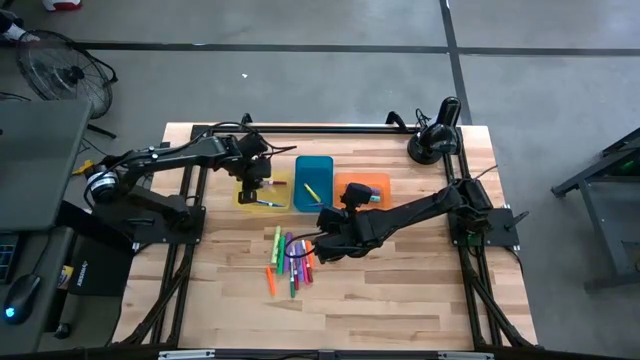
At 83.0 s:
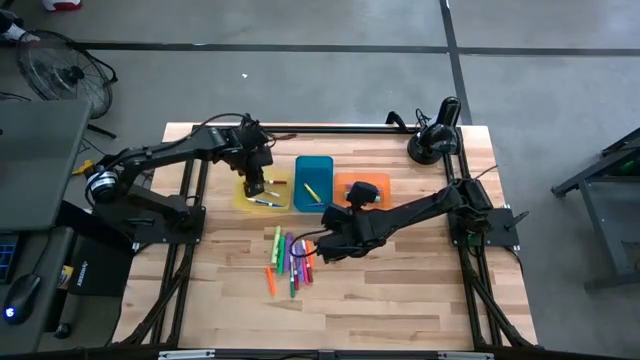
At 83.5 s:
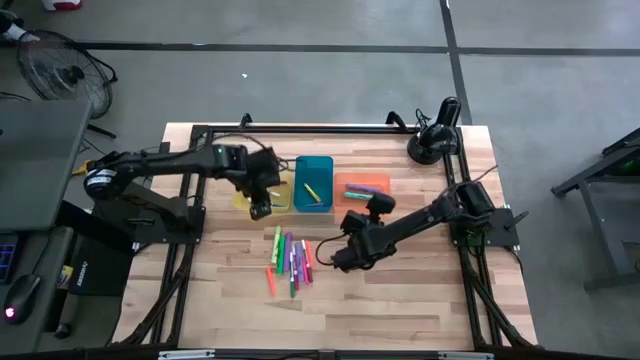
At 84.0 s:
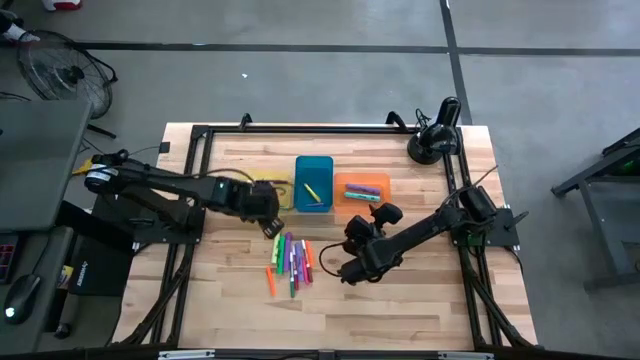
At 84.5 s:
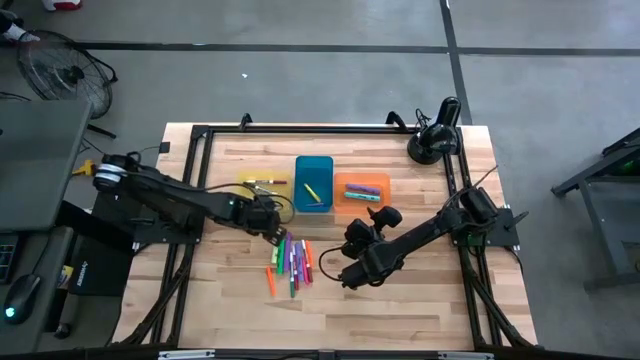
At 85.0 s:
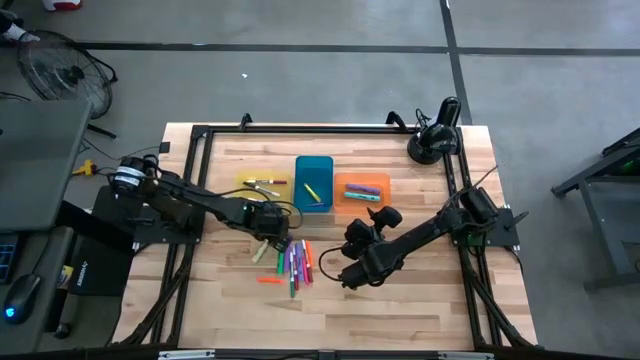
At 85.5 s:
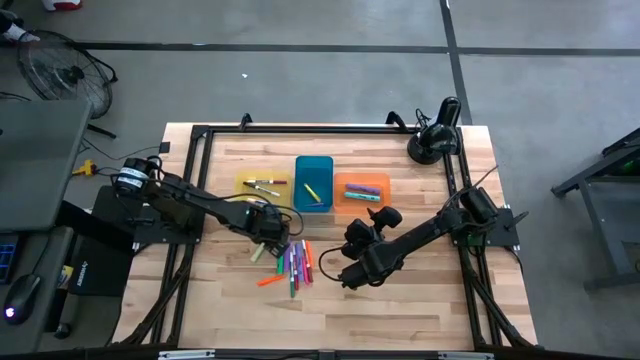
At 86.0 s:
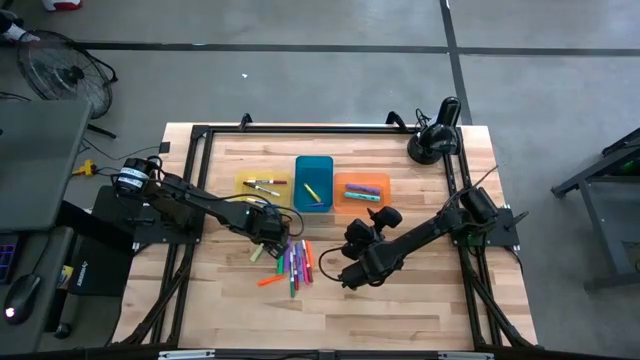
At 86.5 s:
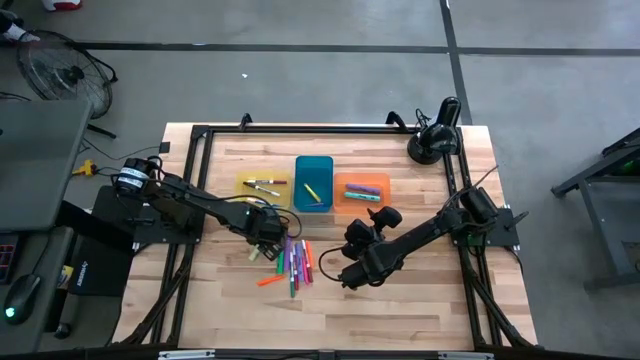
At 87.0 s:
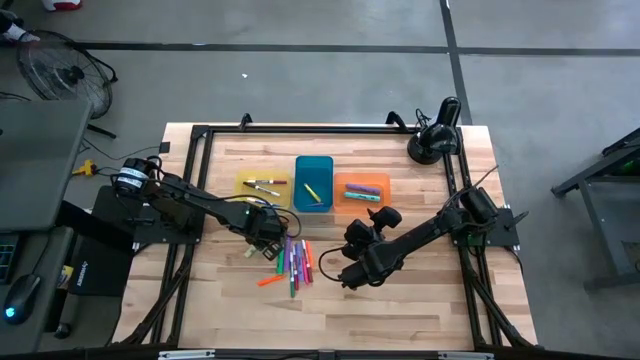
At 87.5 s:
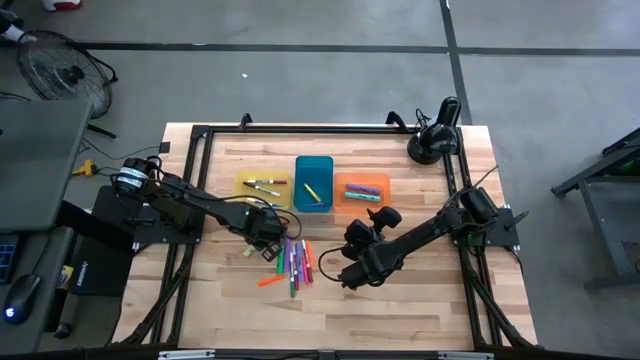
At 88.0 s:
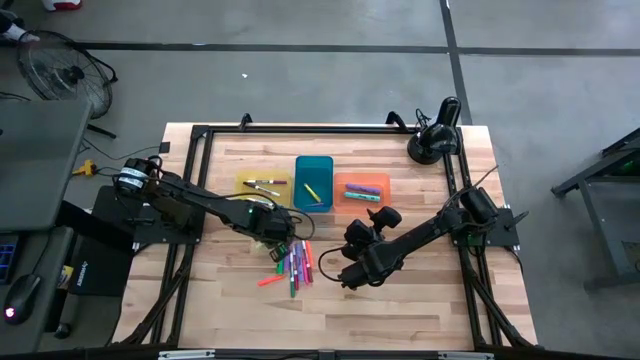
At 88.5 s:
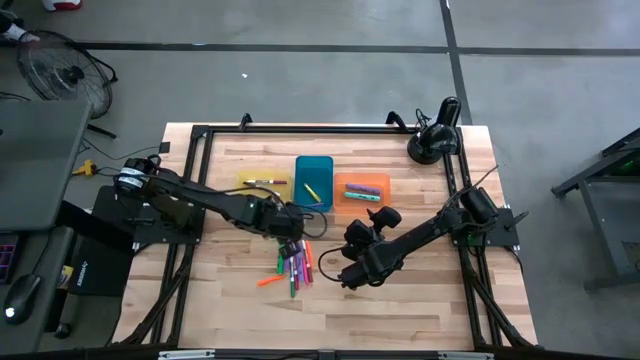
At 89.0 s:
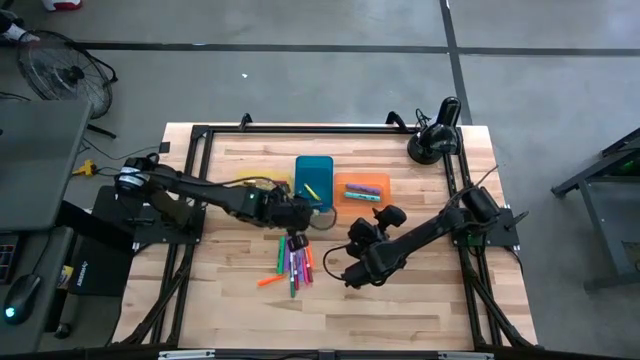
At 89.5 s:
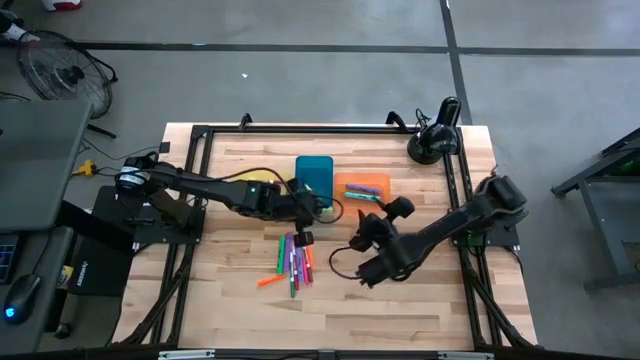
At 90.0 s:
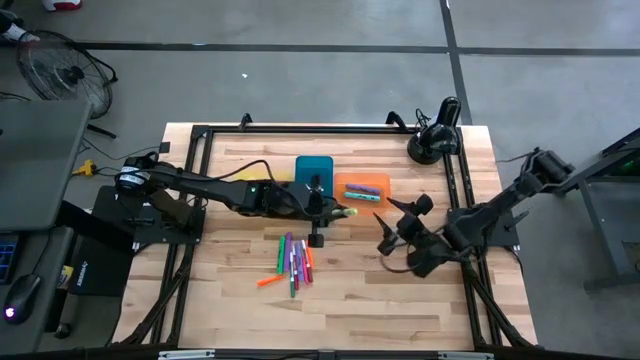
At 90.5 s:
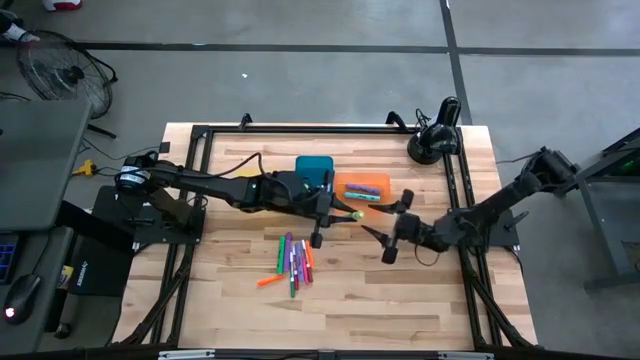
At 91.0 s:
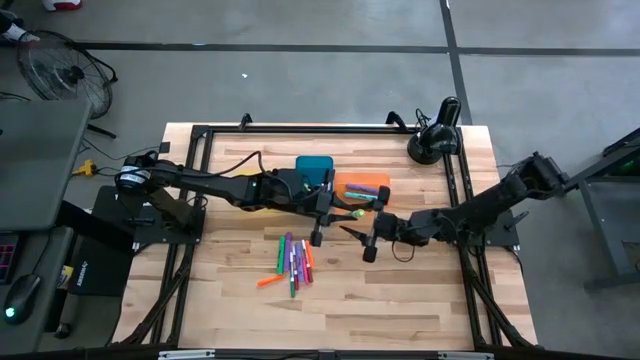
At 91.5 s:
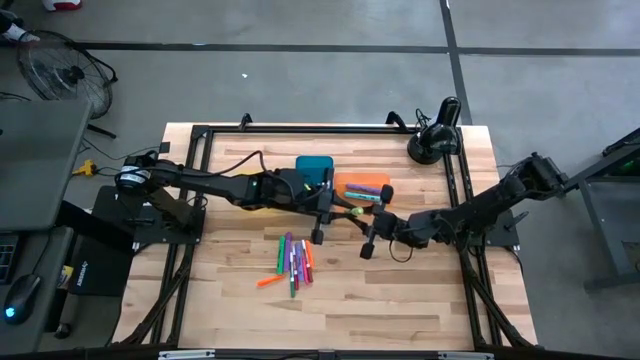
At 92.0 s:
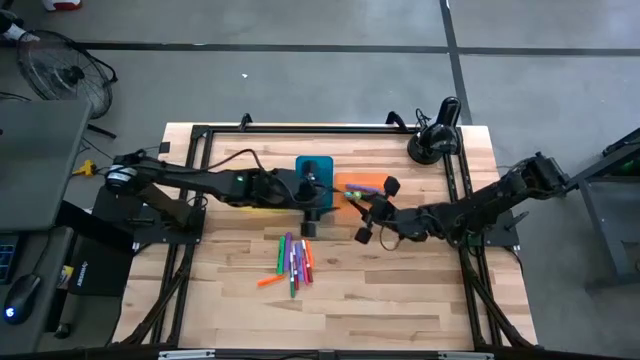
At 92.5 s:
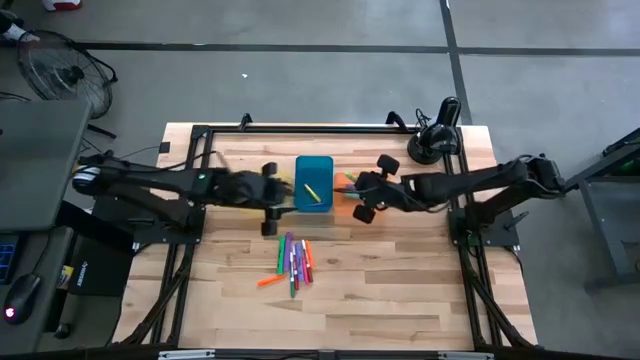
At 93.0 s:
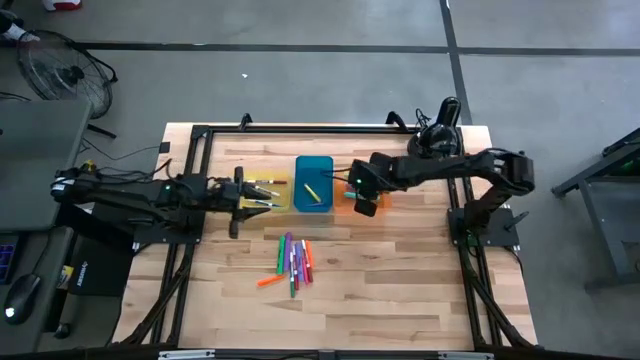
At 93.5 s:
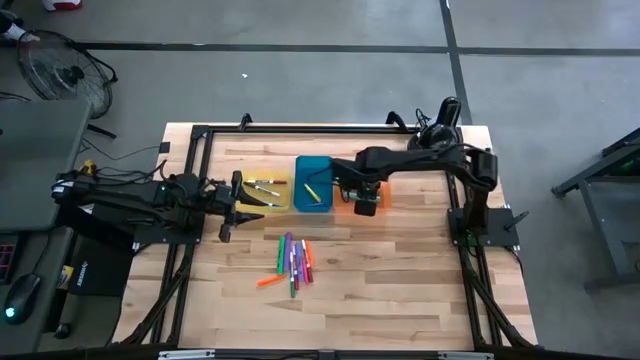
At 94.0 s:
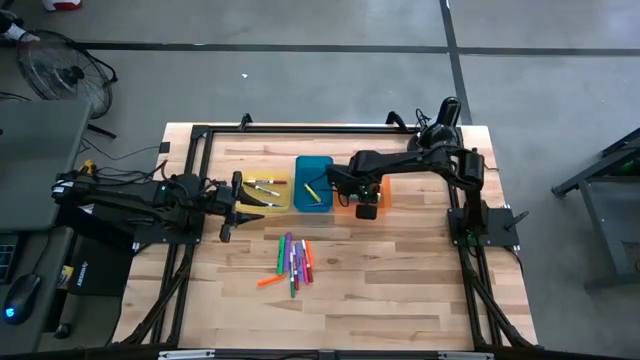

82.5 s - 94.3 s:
Task: Pick & Place Markers
Put the light green highlighter into the orange bin

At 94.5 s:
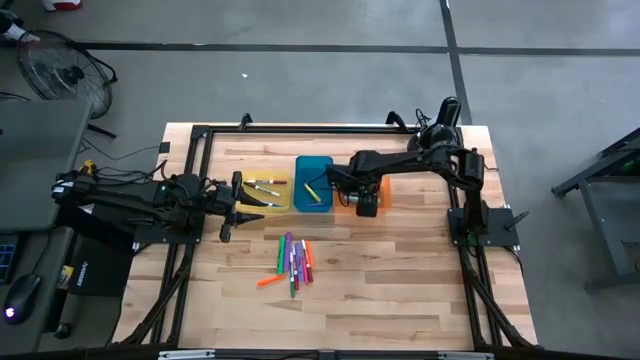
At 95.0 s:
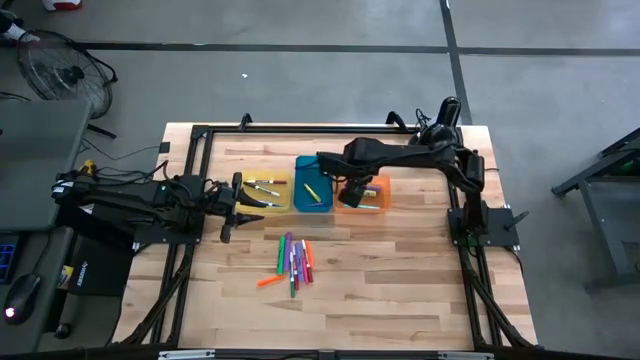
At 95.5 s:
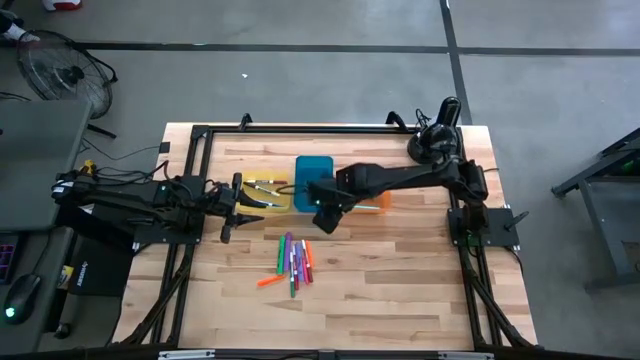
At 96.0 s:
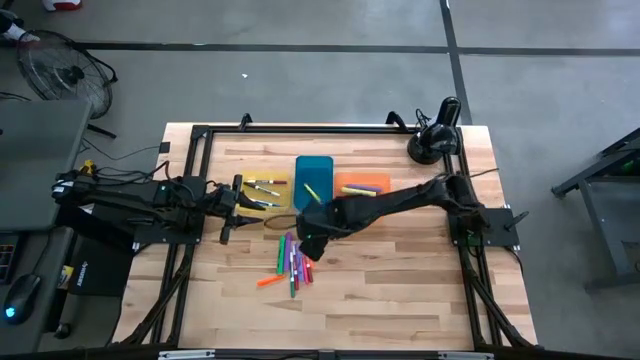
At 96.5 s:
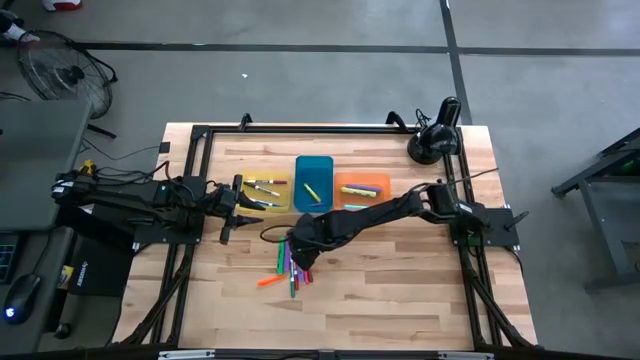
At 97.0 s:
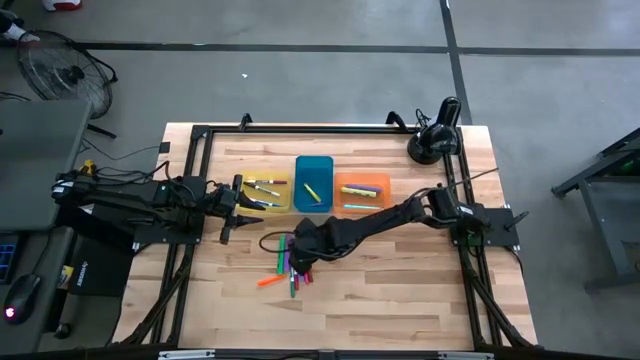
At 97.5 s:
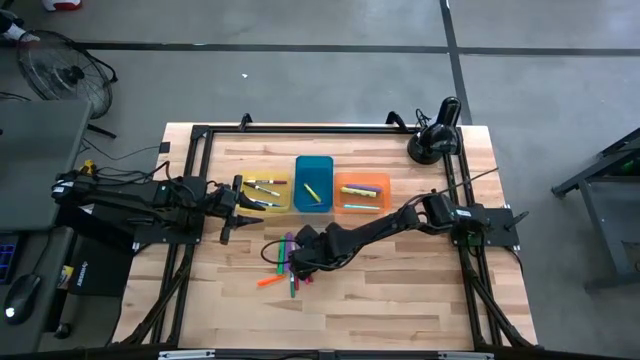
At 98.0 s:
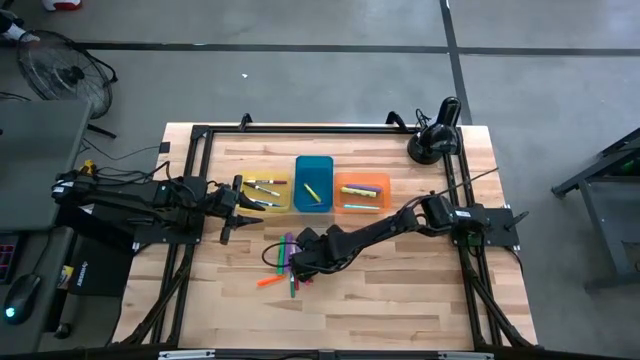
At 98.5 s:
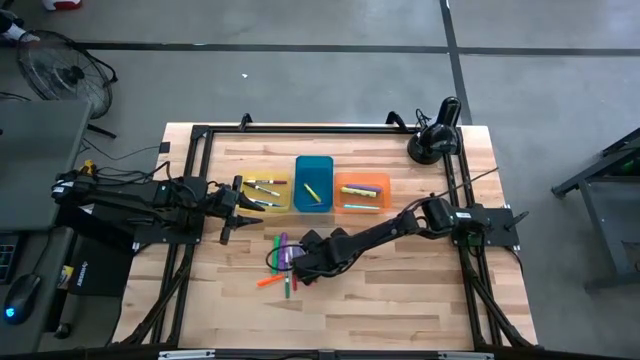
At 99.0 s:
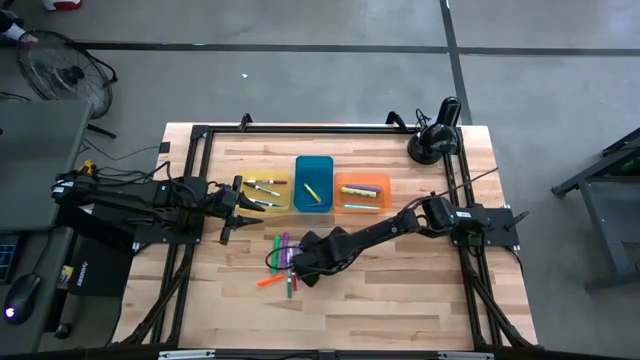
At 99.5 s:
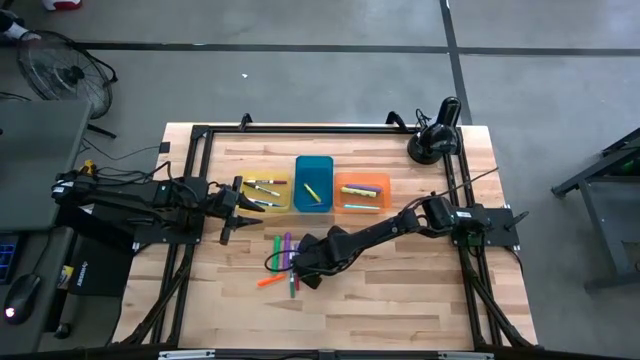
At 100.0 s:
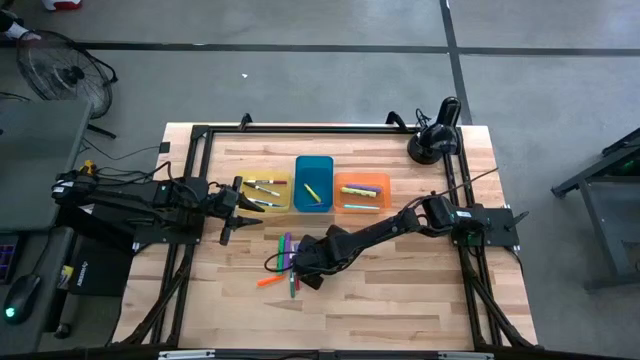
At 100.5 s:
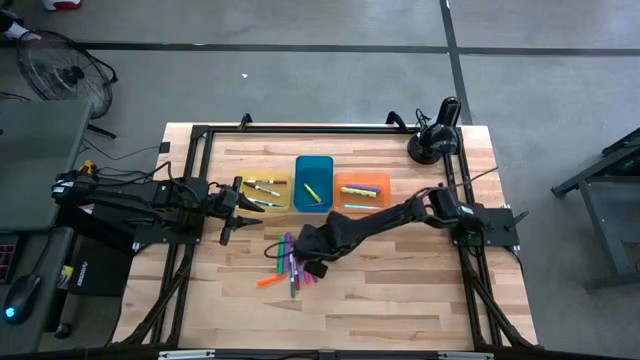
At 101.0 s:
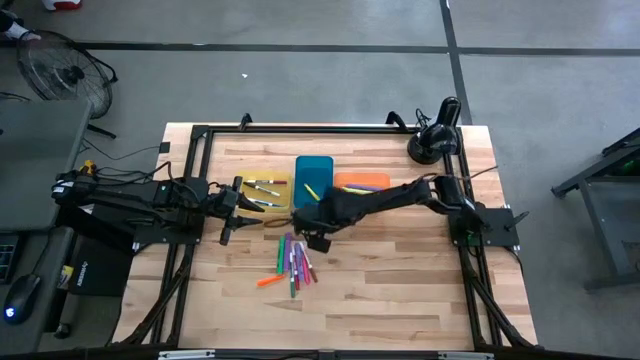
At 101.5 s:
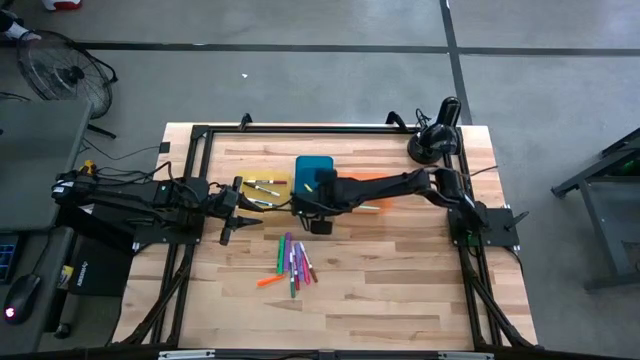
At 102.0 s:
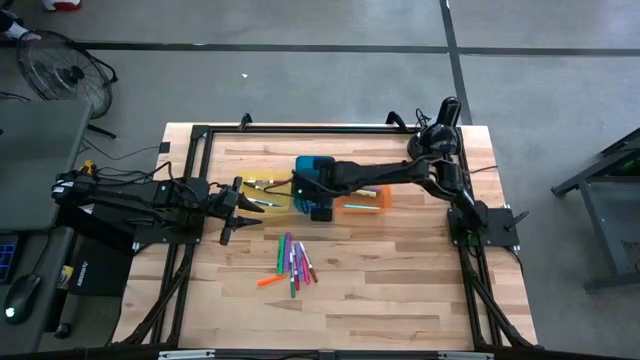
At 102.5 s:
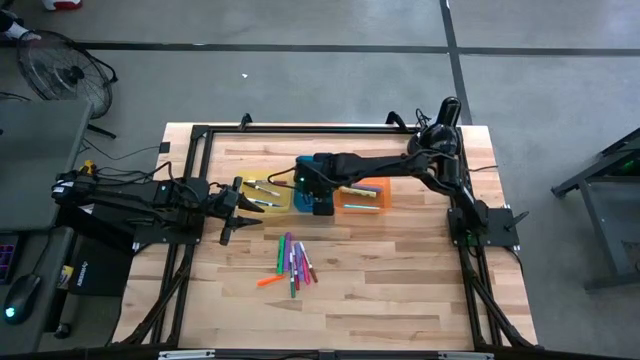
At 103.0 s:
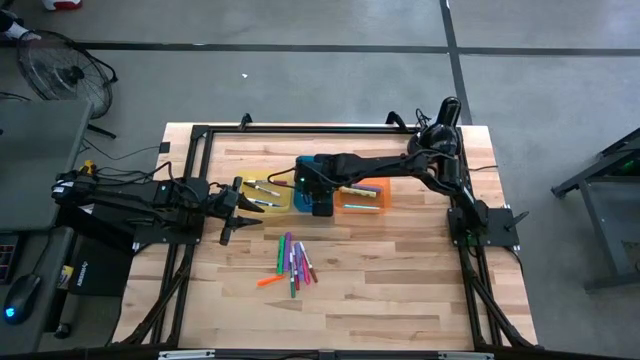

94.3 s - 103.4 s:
Put the right orange pen into the blue bin

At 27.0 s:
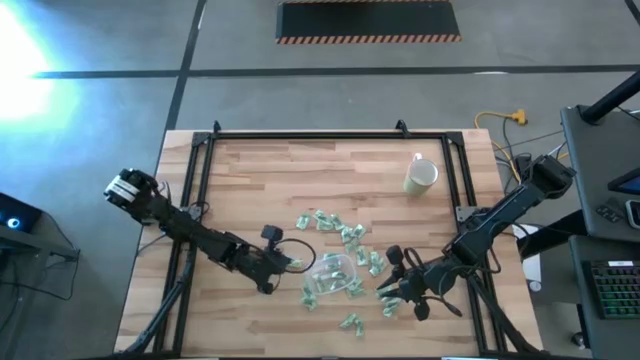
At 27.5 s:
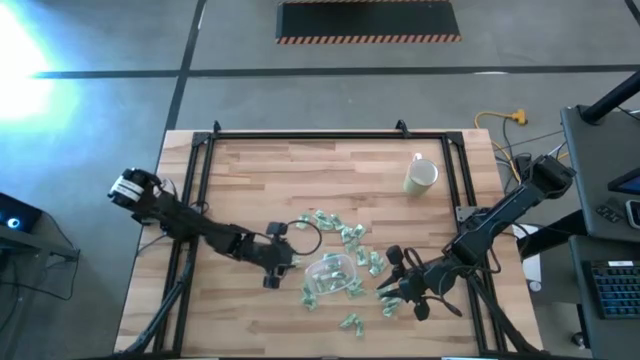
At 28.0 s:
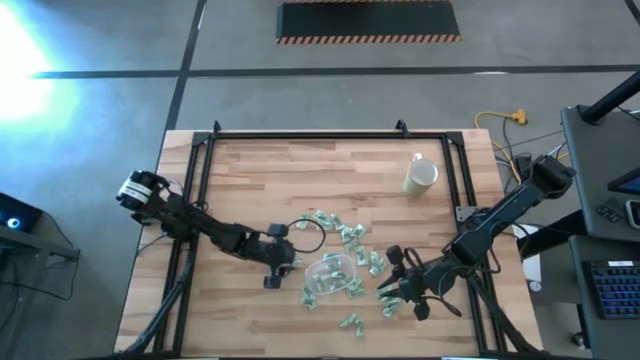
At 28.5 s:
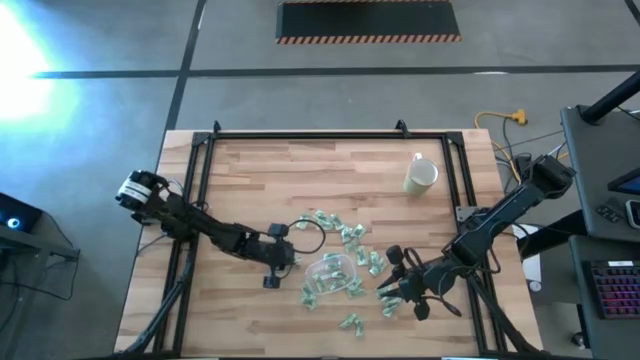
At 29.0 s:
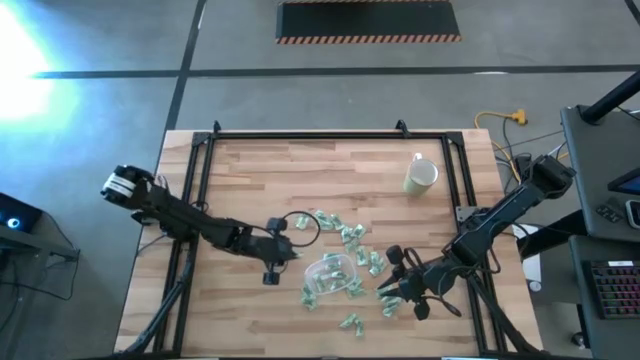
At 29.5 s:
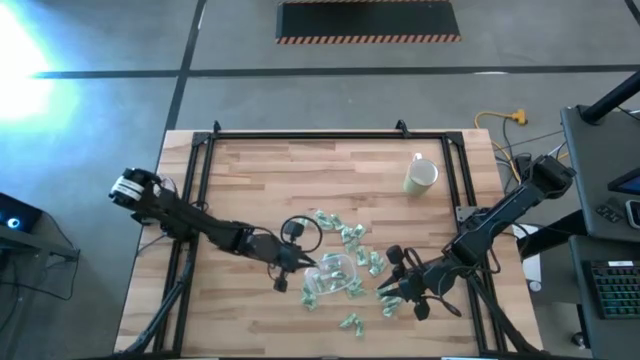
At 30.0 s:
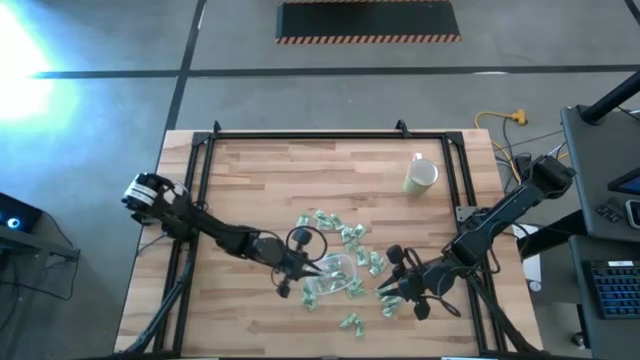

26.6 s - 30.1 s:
Task: Pick and place items into bin
Put the Stevia packet into the transparent bin
